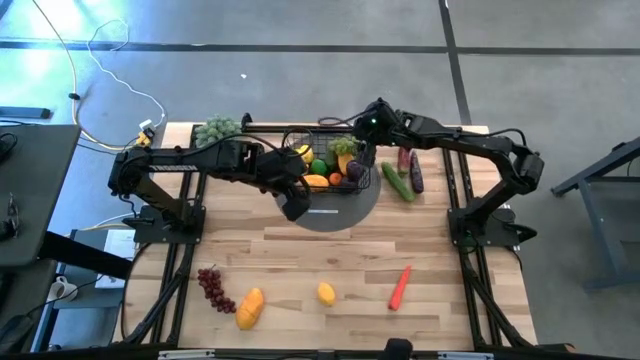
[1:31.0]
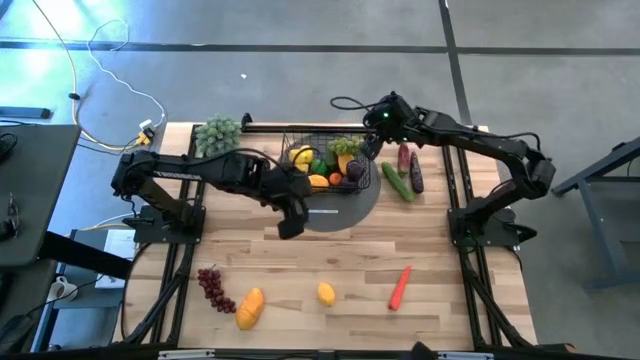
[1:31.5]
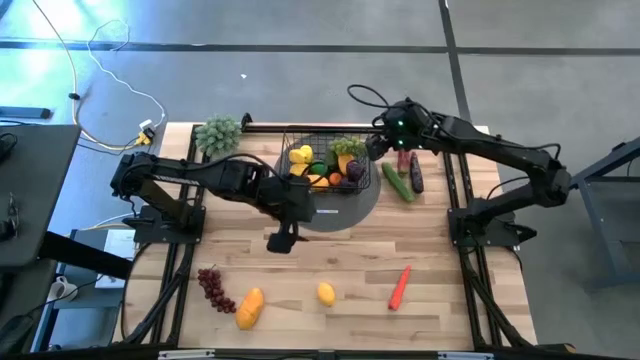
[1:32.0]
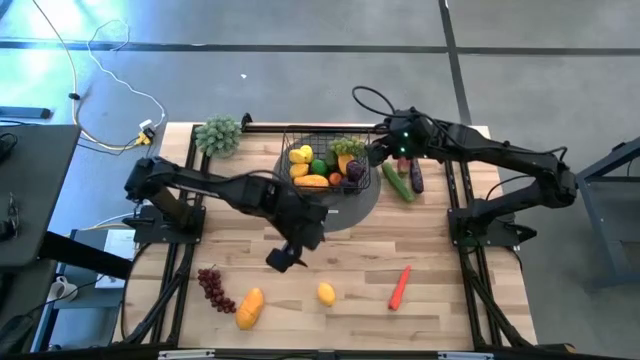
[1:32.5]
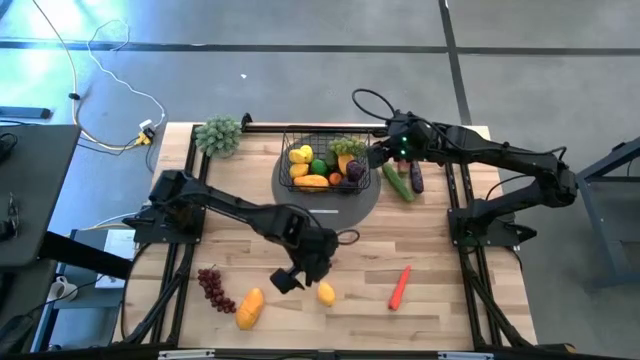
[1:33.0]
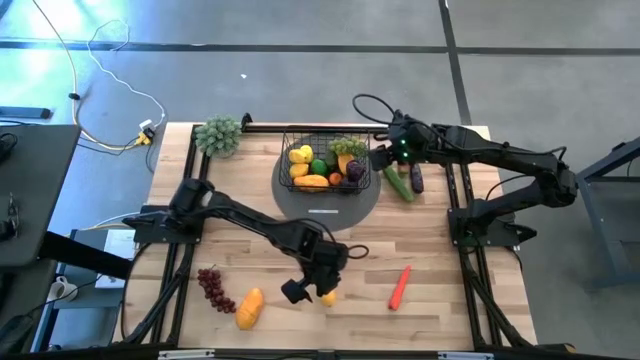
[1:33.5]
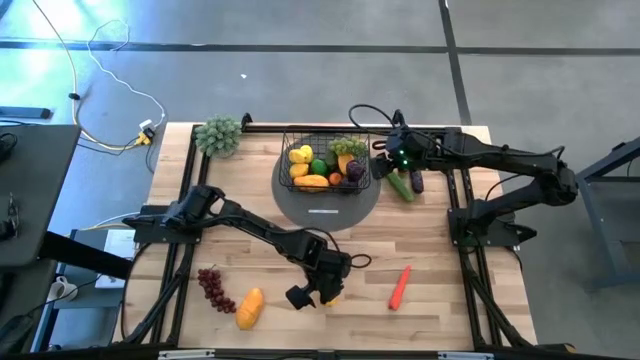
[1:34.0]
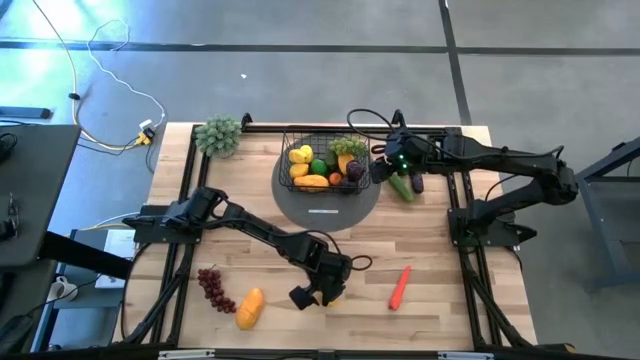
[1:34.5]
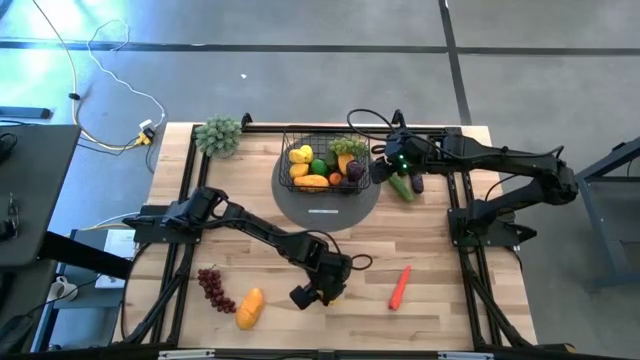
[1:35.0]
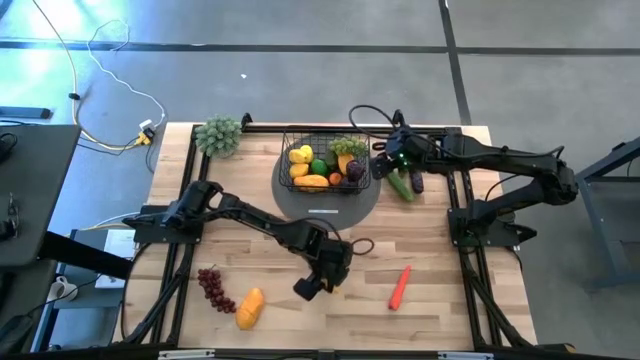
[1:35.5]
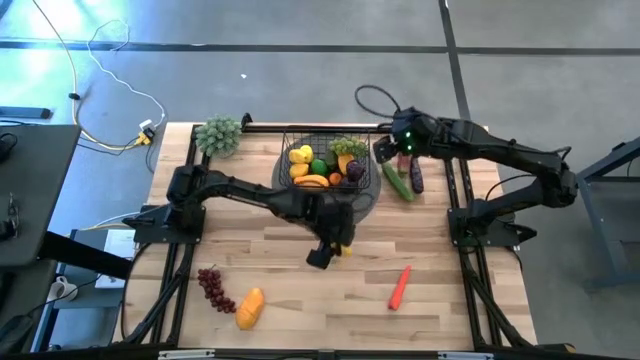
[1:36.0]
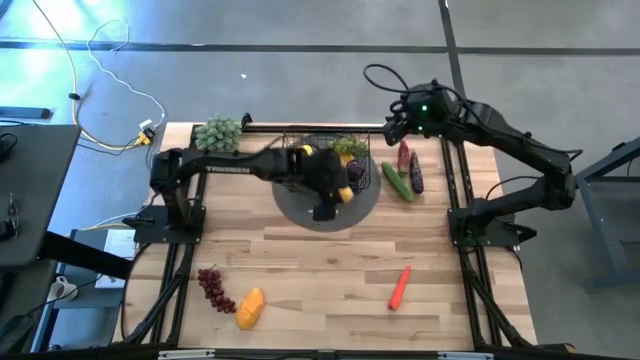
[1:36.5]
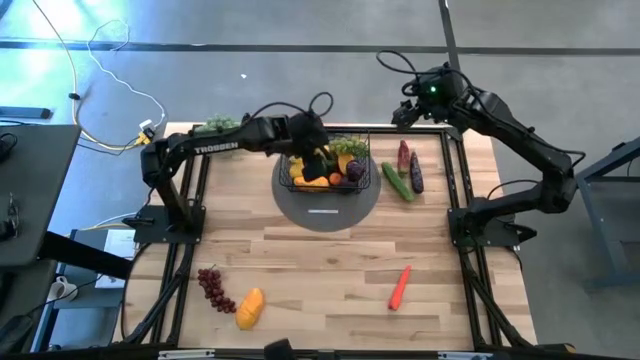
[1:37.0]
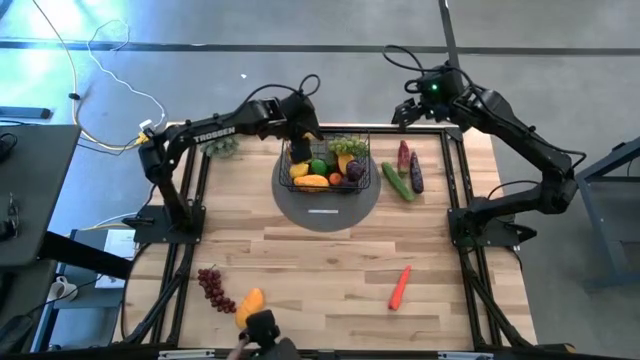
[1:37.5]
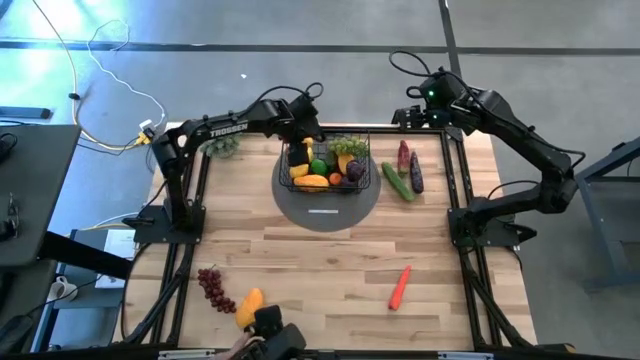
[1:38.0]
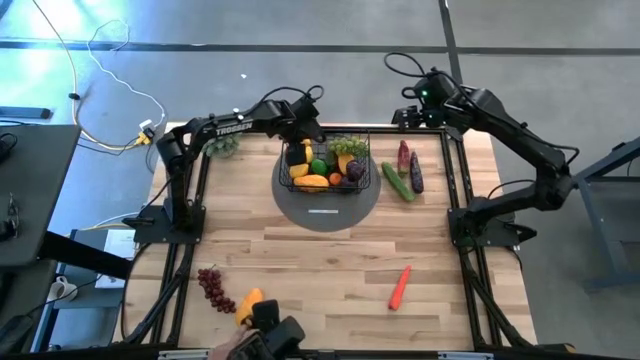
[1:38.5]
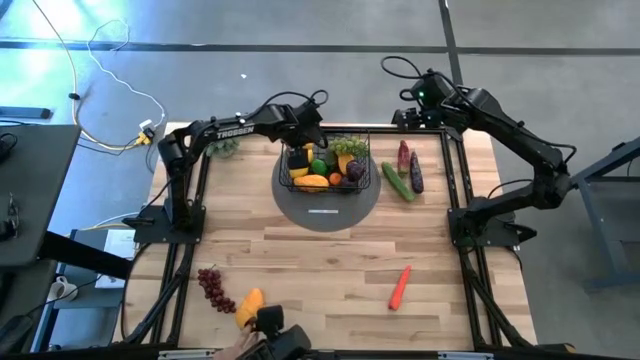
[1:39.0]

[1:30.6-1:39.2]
Task: Build produce basket
Put the yellow lemon into the wire basket

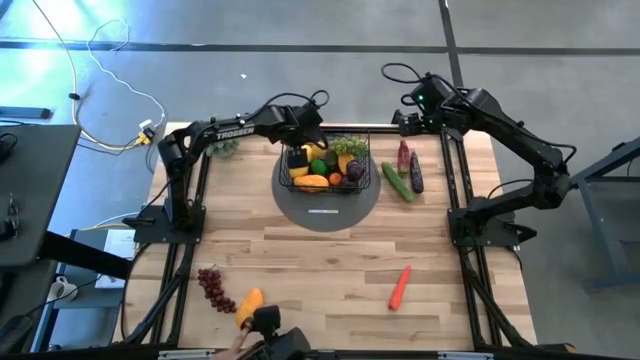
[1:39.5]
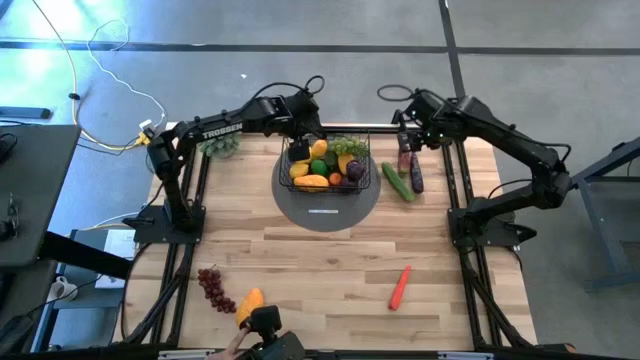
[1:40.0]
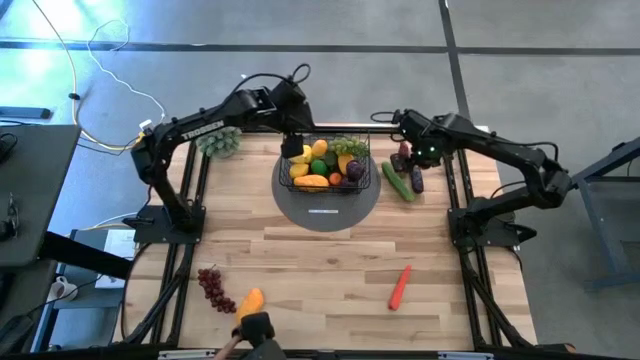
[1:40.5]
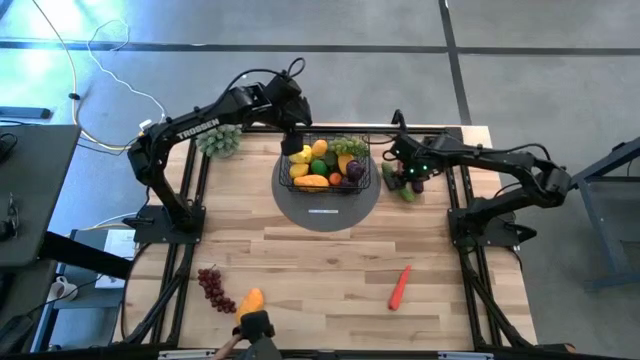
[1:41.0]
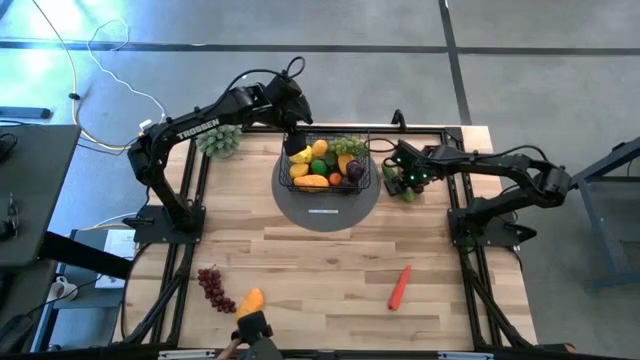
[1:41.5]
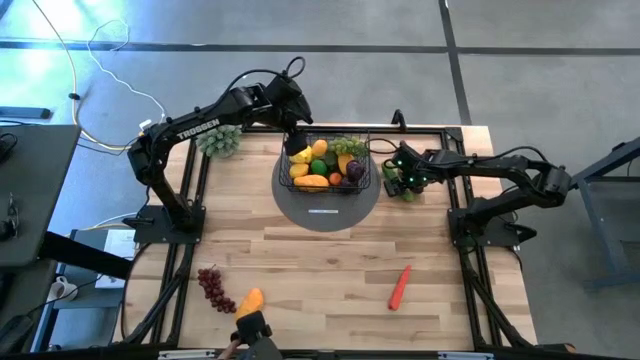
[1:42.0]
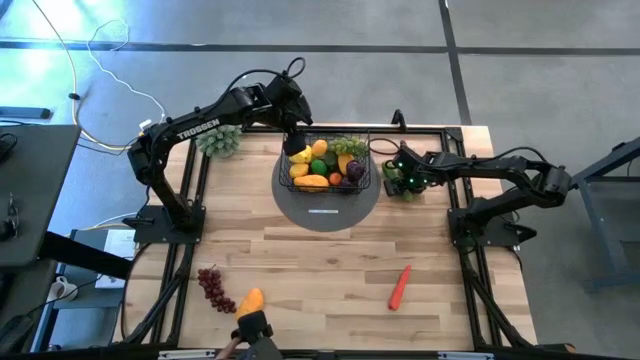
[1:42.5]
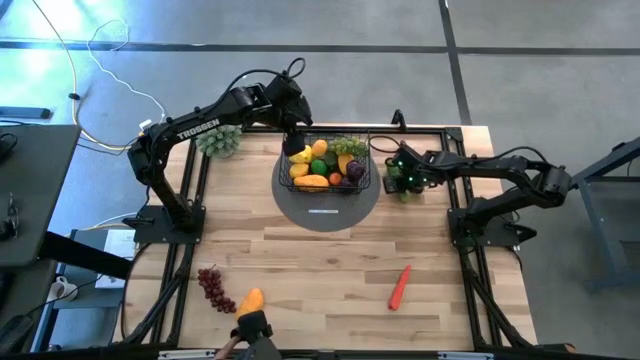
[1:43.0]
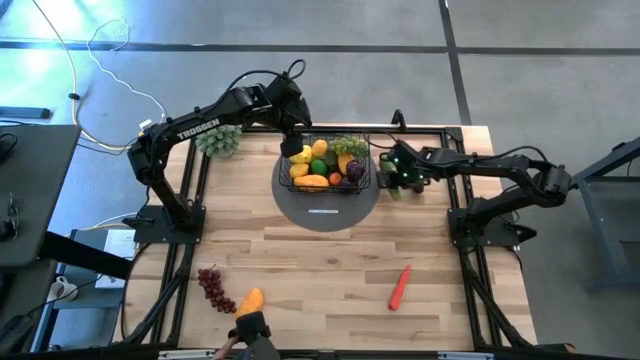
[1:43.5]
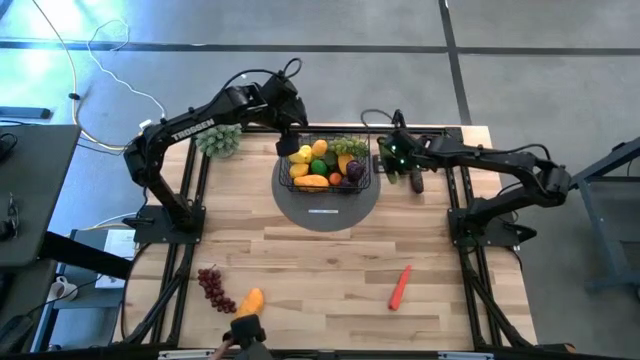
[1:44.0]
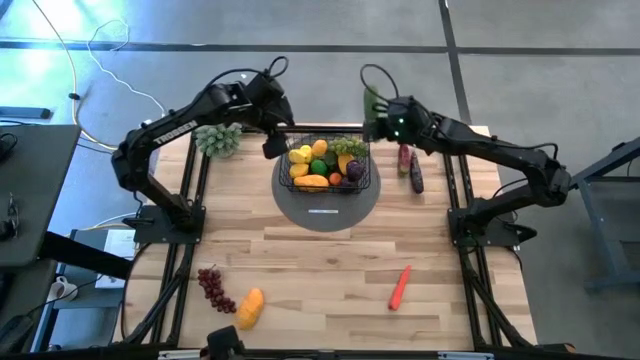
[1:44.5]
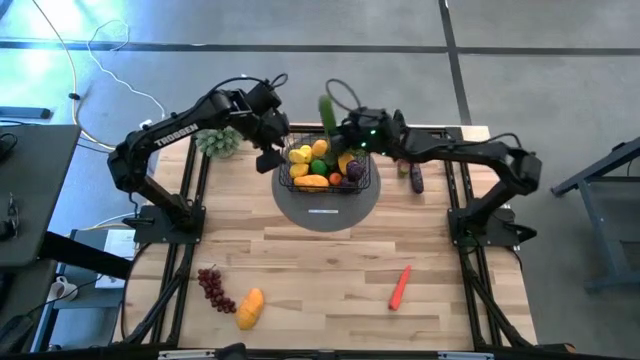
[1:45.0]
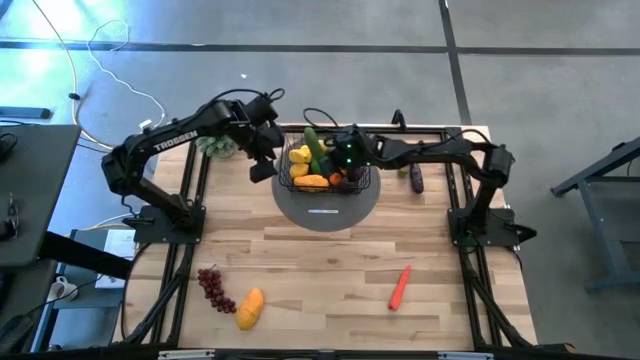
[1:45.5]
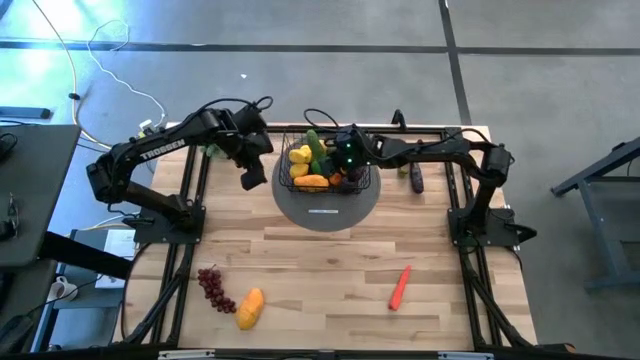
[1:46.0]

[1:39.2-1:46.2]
Put the green cucumber into the wire basket

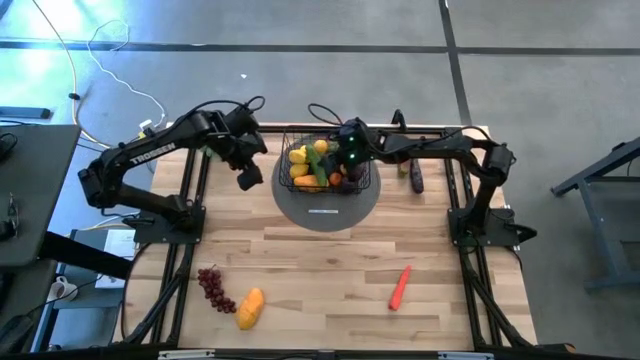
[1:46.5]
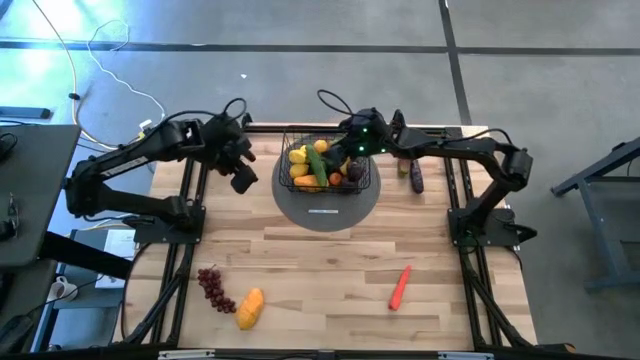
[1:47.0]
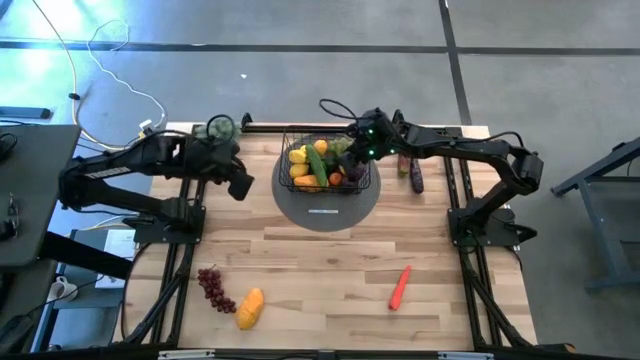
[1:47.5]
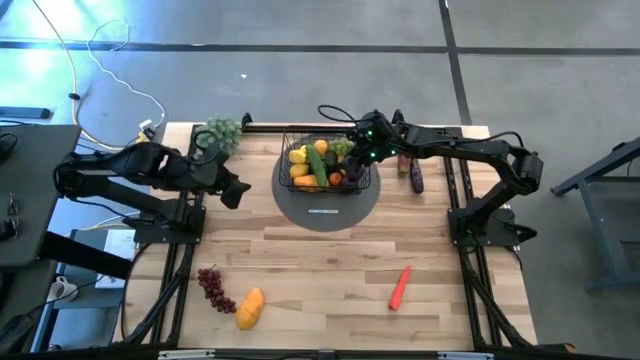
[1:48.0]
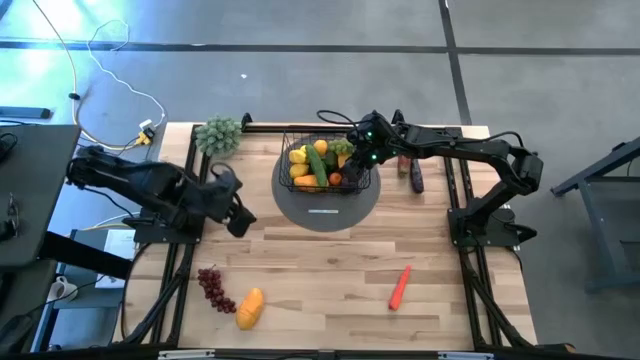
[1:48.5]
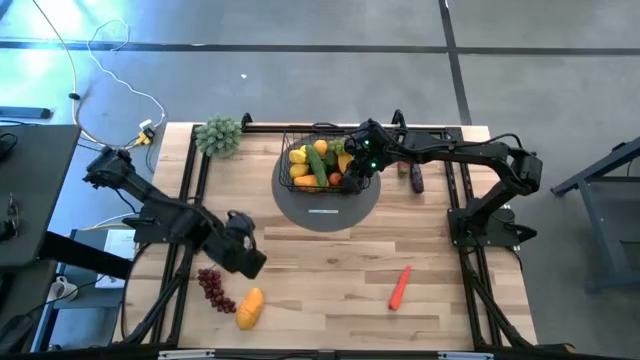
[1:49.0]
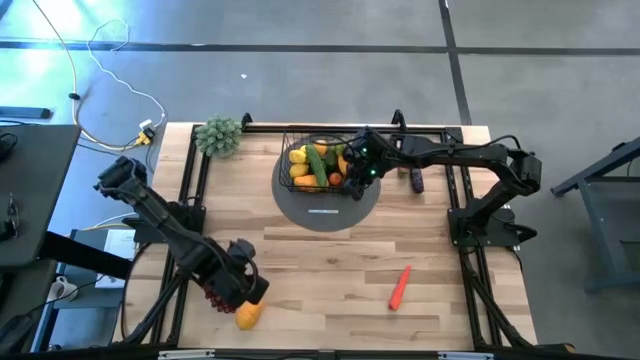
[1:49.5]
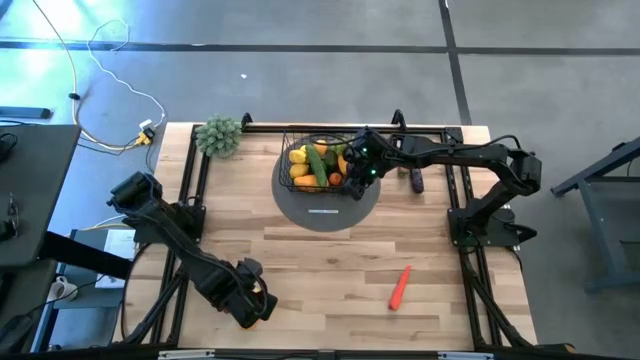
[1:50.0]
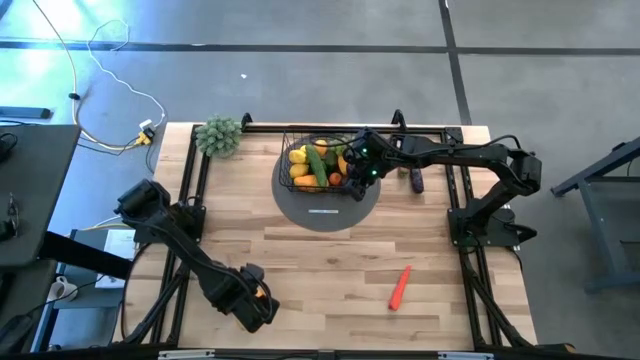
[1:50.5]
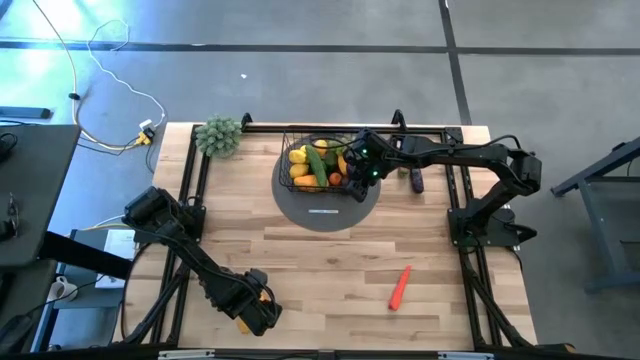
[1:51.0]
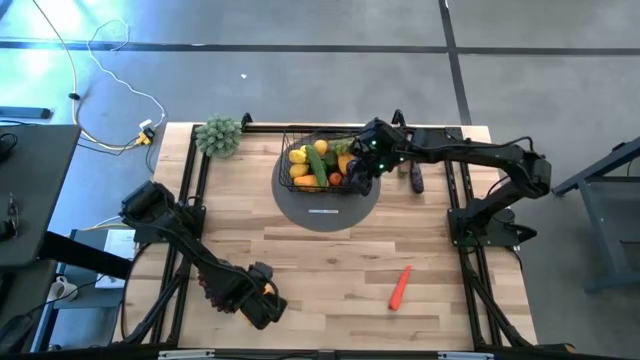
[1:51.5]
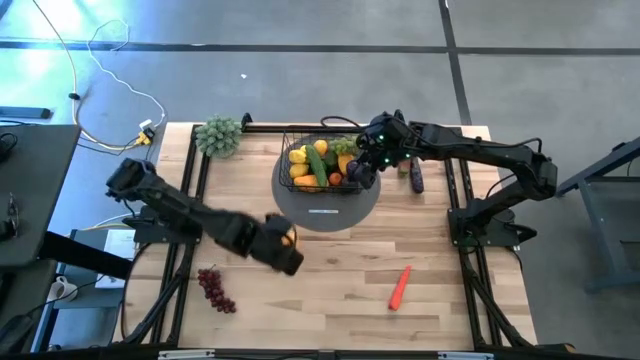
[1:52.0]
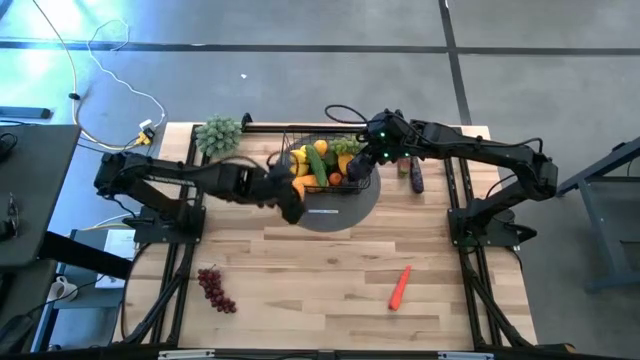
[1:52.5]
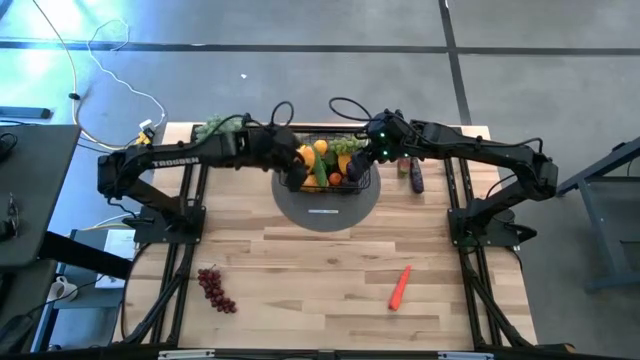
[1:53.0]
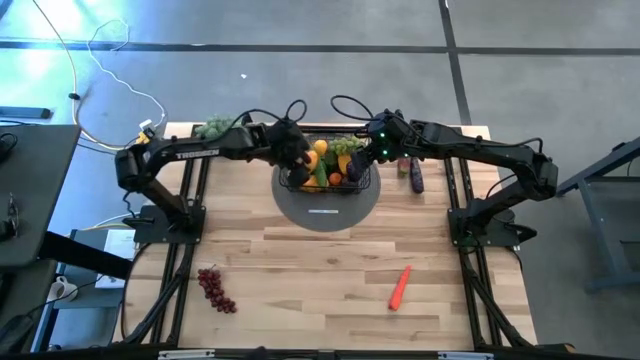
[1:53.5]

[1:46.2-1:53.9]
Put the yellow mango into the wire basket
